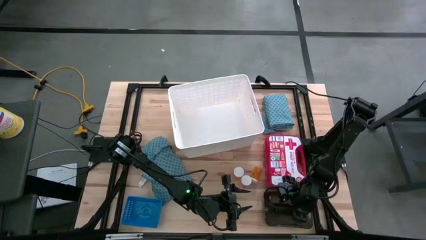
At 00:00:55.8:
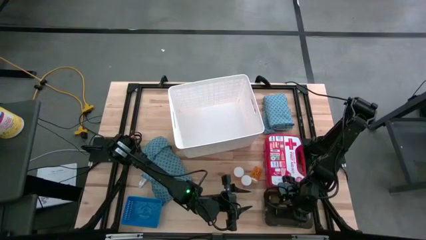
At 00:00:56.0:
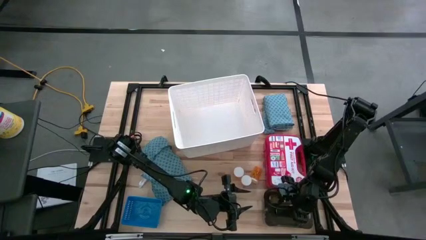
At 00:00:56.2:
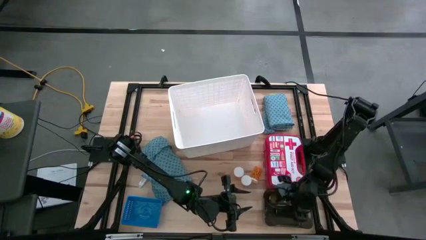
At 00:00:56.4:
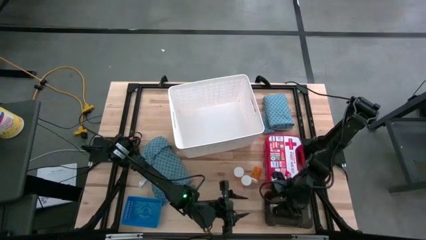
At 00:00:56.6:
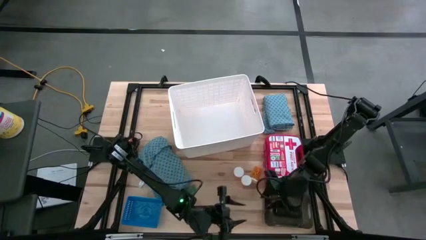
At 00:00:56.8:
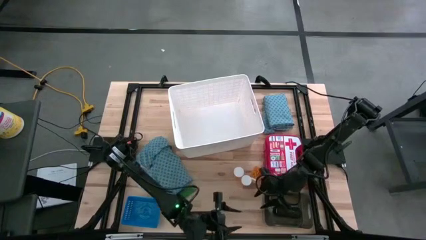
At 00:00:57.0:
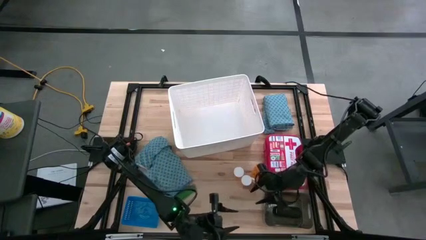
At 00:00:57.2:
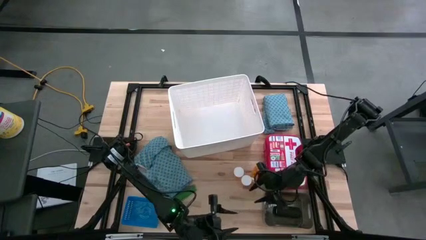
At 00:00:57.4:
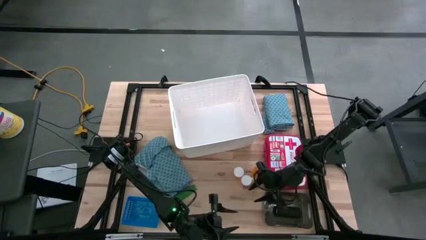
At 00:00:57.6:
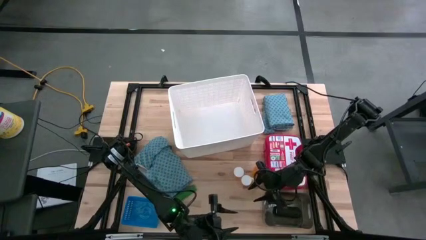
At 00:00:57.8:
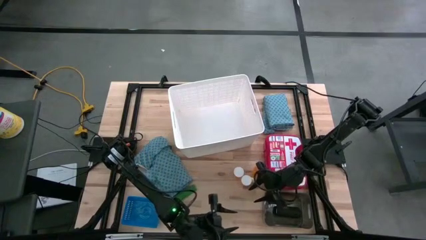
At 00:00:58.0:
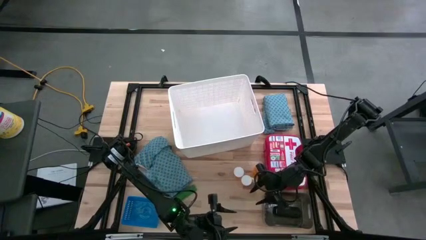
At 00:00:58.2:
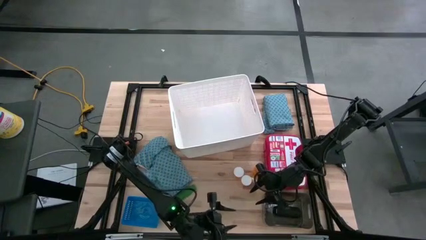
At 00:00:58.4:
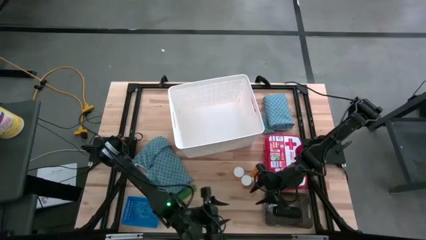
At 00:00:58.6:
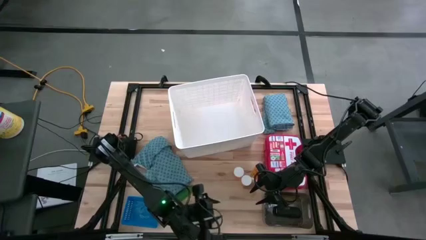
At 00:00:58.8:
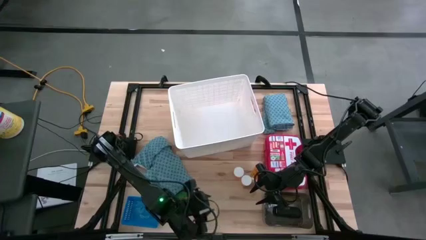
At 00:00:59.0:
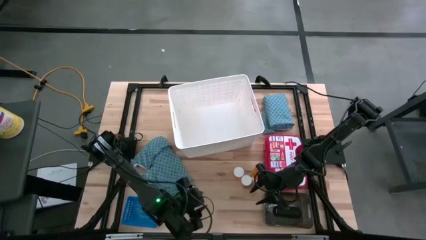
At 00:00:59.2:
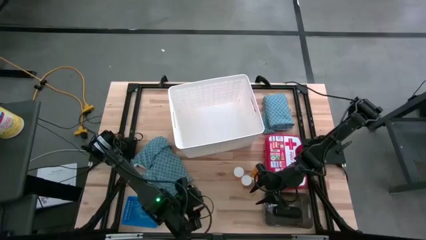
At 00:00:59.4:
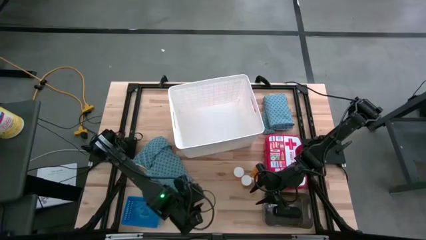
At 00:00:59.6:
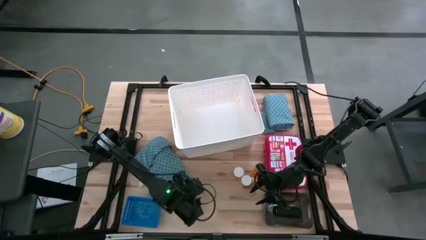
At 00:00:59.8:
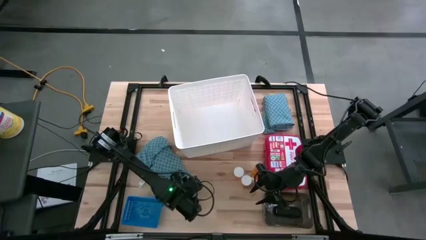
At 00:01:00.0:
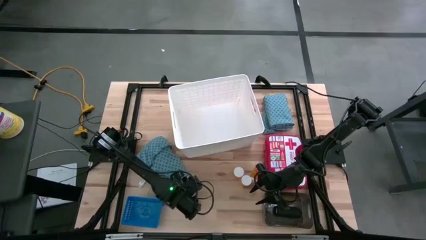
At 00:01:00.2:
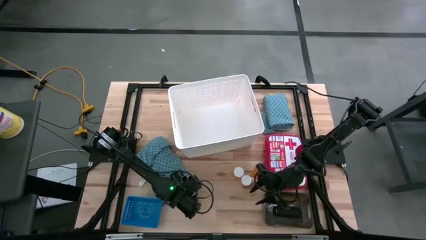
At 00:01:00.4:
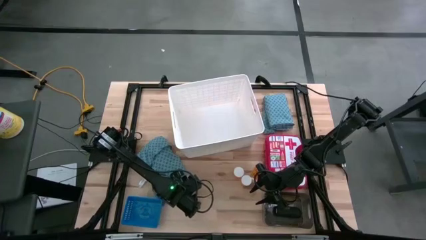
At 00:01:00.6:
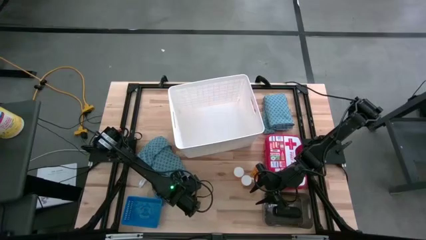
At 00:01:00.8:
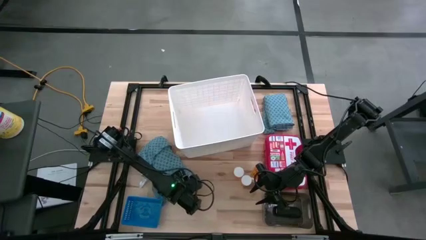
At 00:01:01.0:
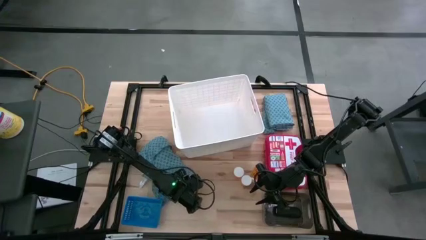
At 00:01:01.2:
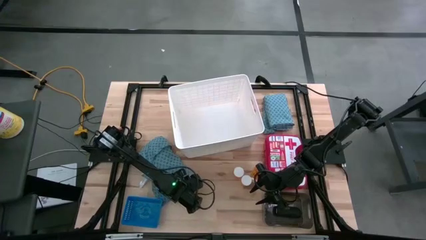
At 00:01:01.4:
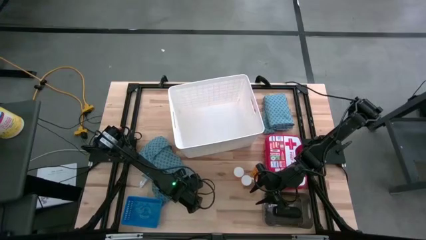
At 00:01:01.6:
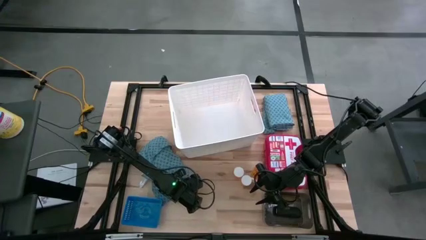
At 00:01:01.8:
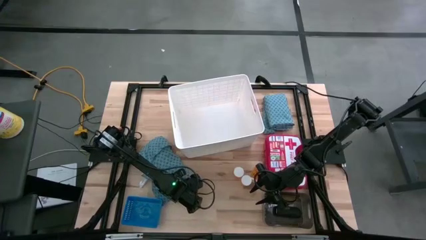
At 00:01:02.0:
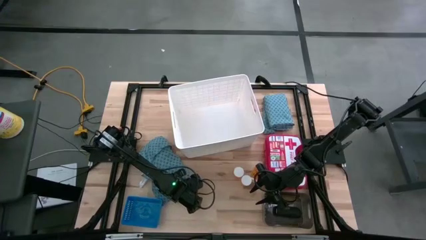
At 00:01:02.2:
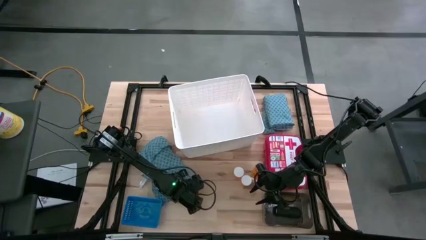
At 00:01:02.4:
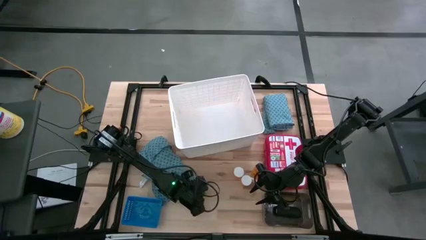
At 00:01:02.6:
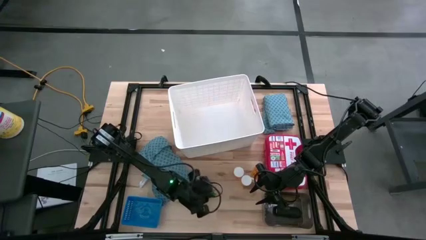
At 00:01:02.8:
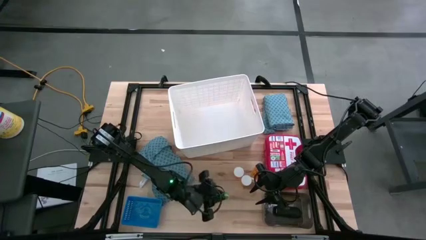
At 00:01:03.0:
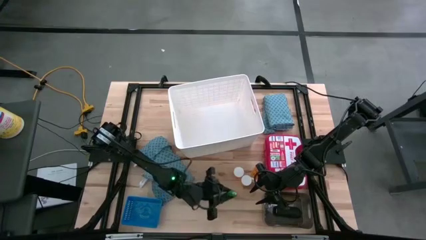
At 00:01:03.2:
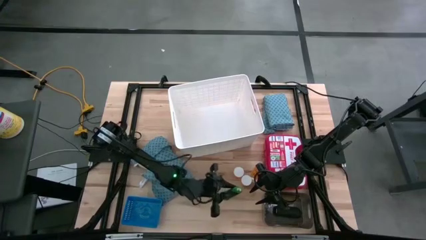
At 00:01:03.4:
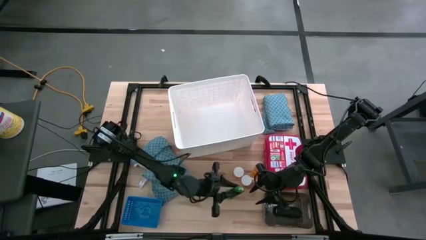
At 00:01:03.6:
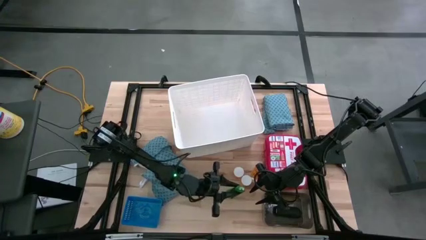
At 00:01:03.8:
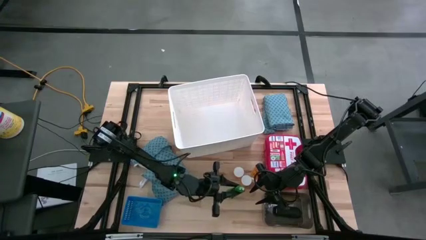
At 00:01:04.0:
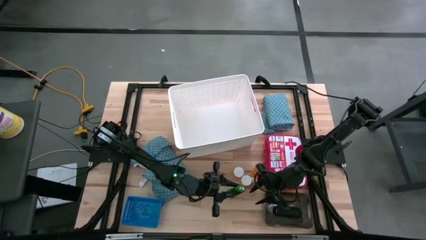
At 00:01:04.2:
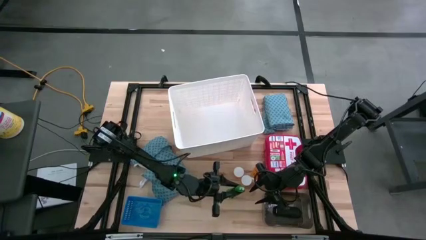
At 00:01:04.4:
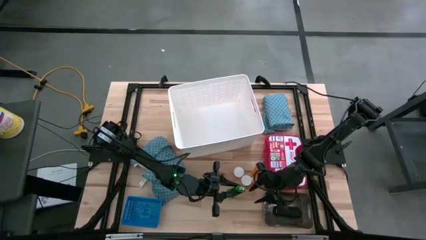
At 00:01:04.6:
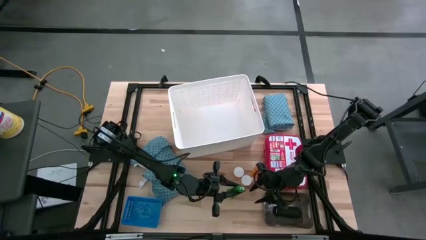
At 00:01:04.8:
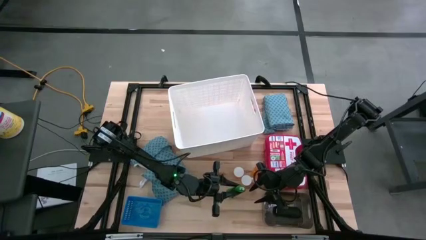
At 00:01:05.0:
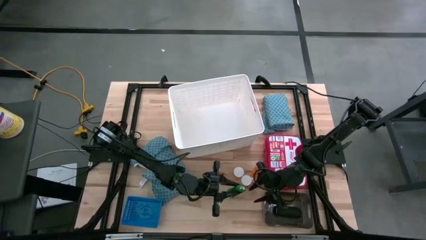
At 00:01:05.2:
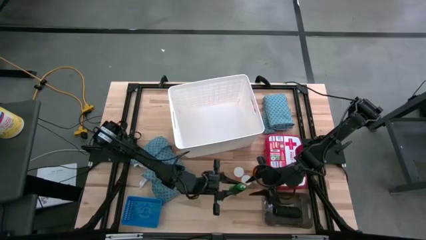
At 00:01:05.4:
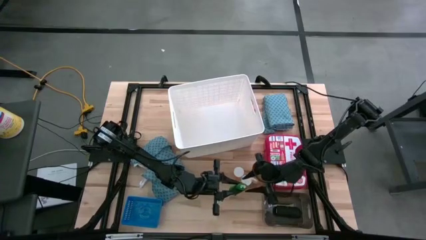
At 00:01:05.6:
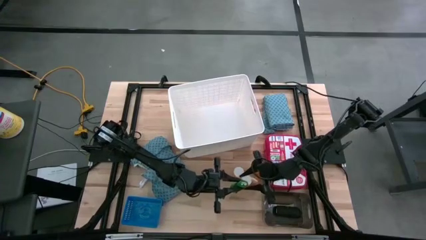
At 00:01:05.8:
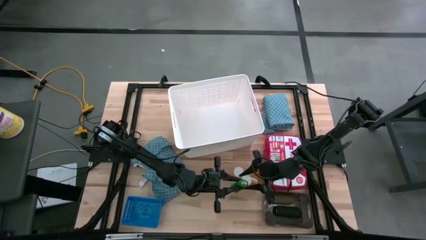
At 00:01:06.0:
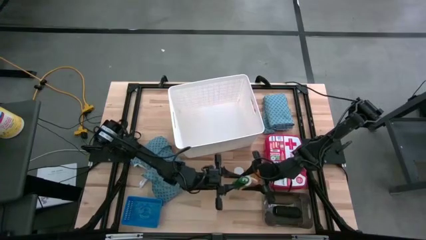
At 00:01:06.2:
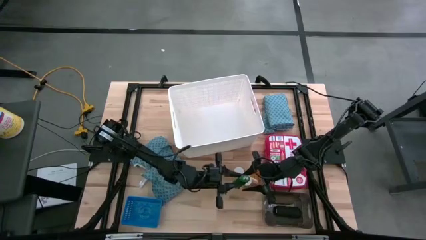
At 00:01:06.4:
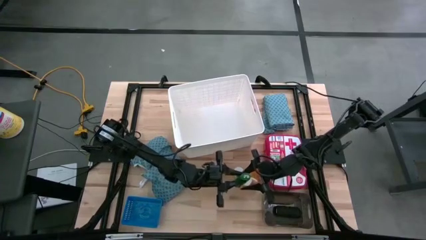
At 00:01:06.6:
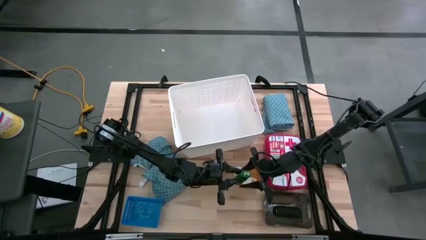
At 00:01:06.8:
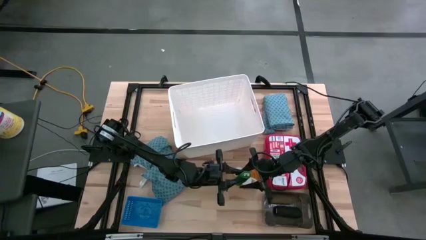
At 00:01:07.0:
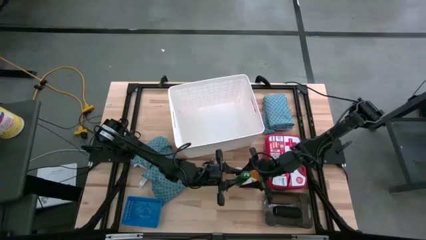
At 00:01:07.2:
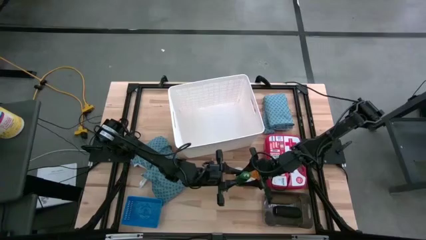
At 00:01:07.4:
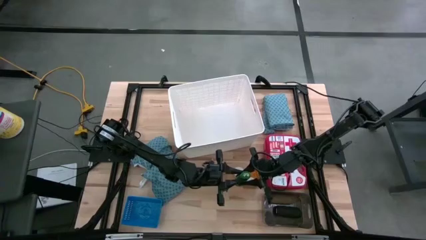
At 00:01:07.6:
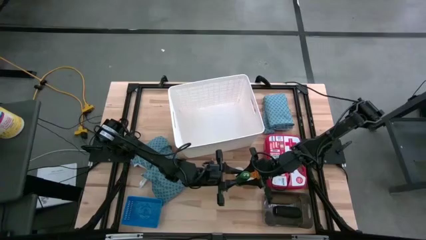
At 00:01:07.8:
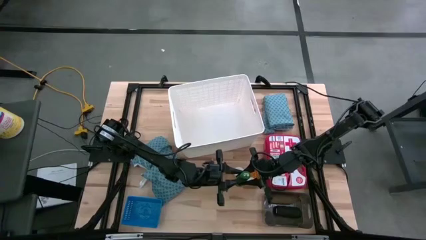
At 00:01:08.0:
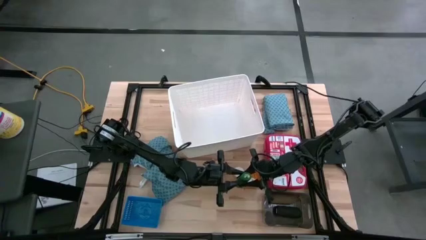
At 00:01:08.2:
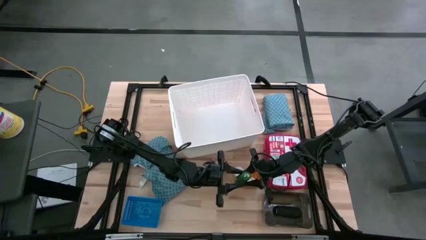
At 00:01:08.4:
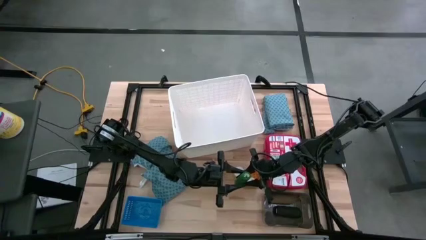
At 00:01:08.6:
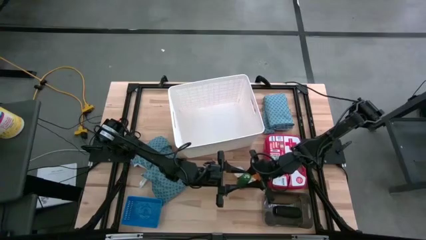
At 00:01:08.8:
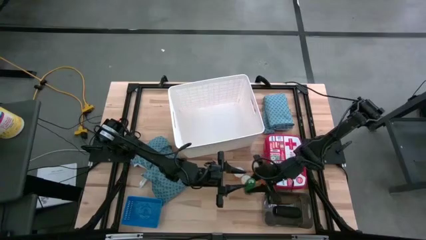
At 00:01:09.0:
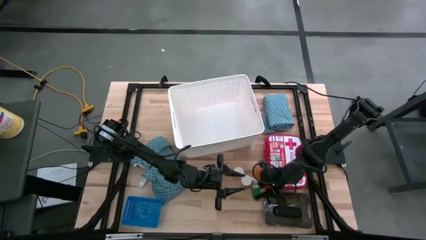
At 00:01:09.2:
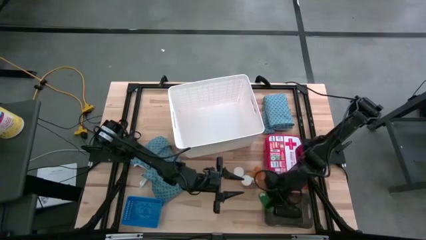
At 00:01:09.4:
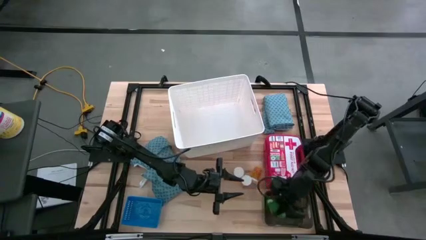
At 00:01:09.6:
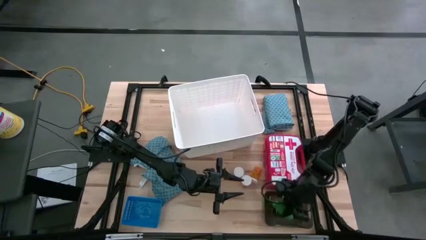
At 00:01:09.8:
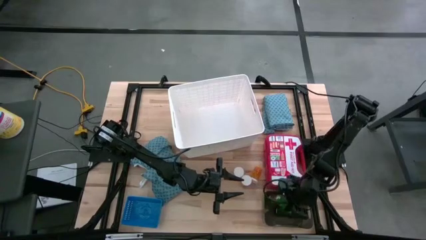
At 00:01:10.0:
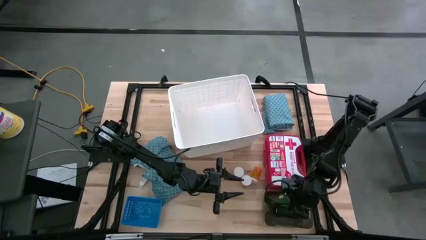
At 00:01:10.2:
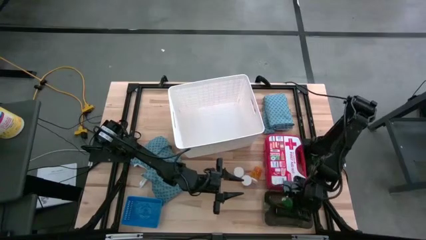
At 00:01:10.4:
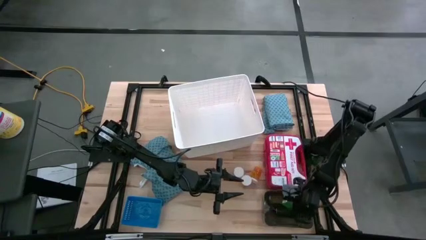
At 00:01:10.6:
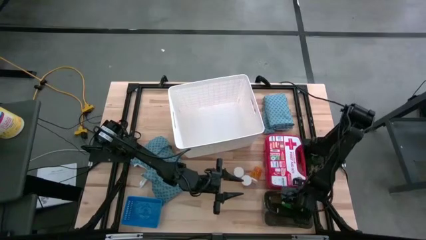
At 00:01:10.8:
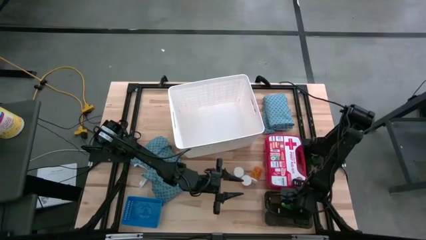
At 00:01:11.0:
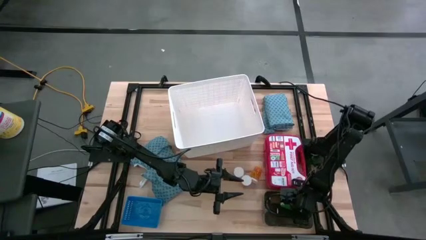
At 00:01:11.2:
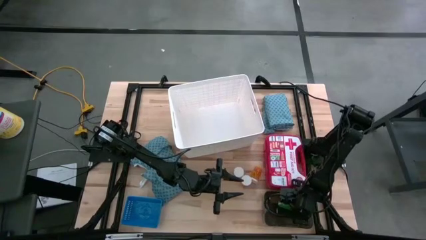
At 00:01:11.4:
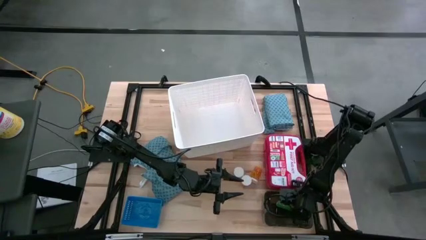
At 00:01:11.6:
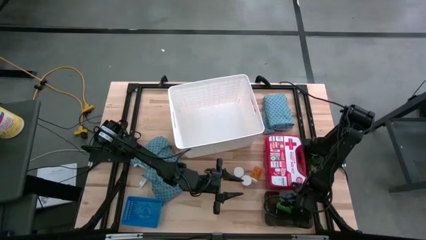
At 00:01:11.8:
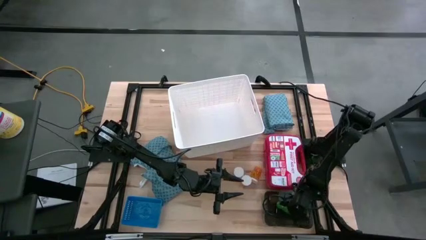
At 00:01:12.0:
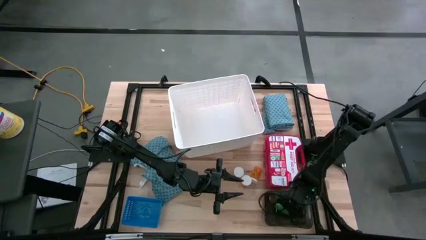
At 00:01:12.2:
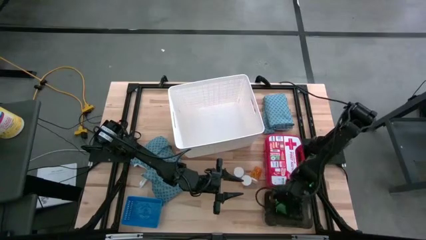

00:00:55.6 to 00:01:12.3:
Task: Pick & place medical supplies in basket/bin
Put the brown bandage into the black bin
